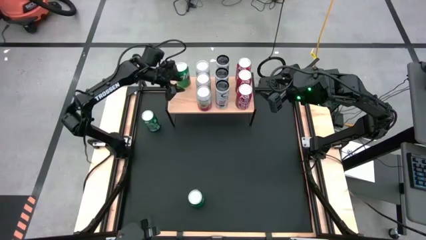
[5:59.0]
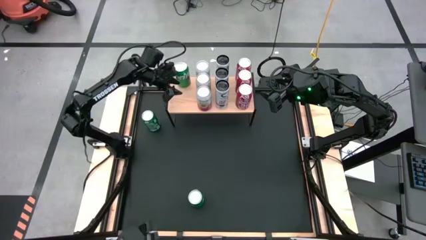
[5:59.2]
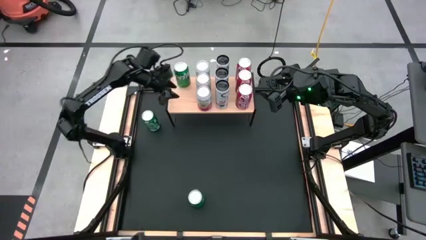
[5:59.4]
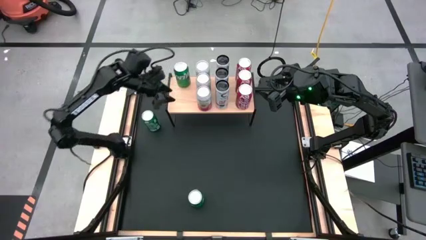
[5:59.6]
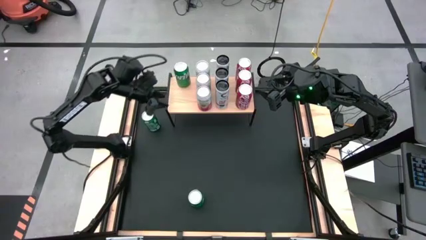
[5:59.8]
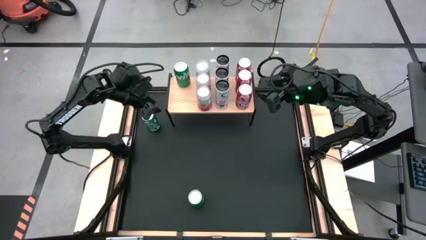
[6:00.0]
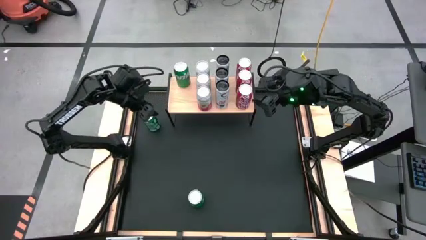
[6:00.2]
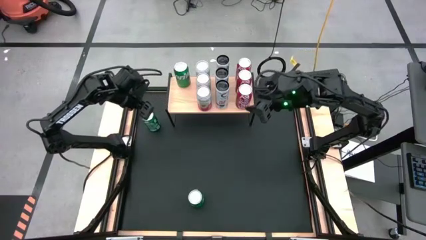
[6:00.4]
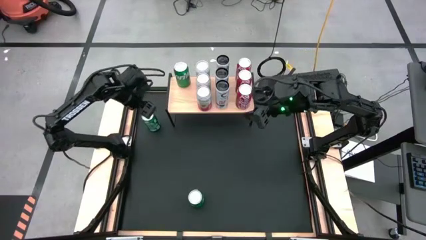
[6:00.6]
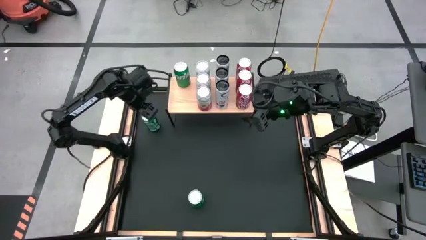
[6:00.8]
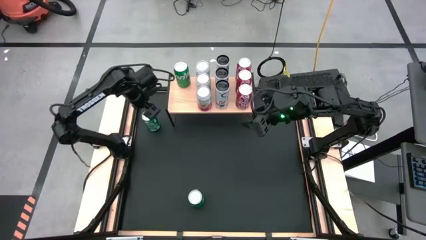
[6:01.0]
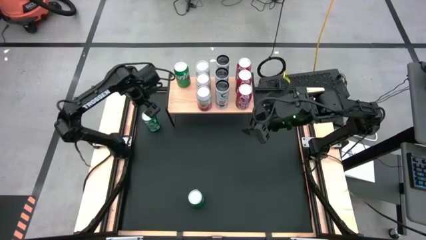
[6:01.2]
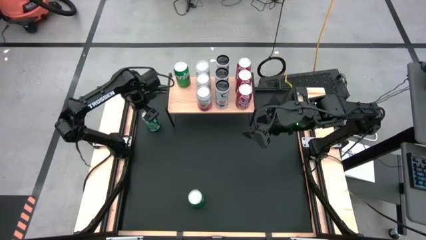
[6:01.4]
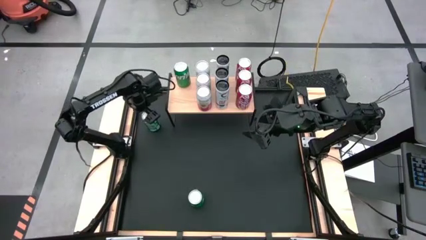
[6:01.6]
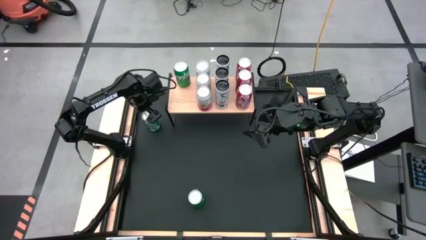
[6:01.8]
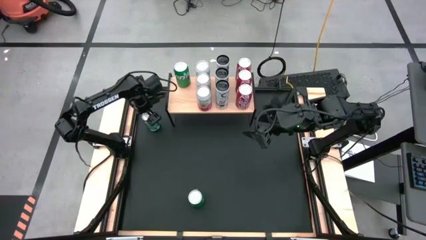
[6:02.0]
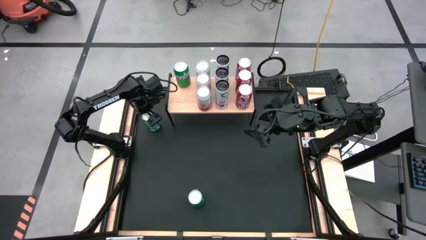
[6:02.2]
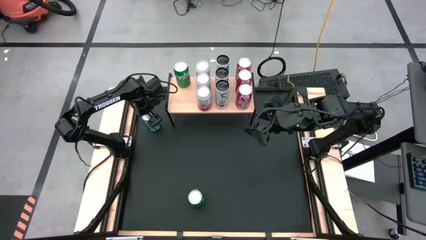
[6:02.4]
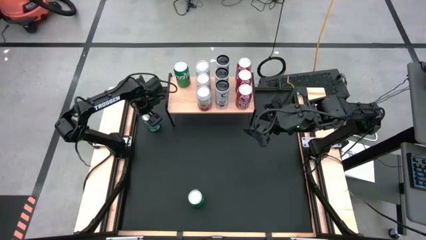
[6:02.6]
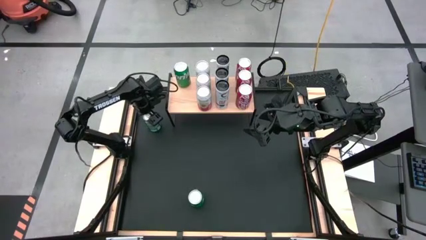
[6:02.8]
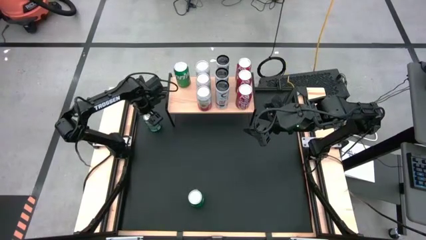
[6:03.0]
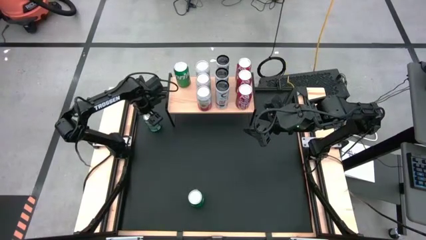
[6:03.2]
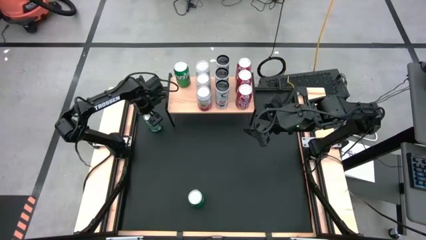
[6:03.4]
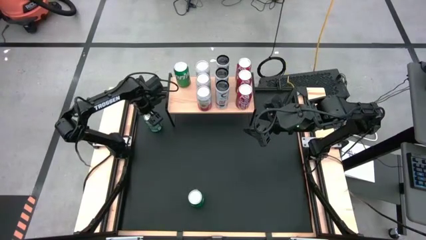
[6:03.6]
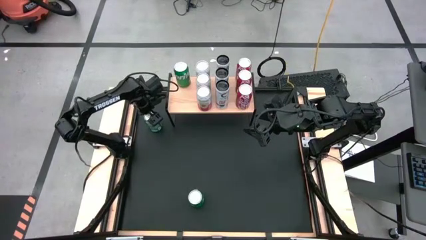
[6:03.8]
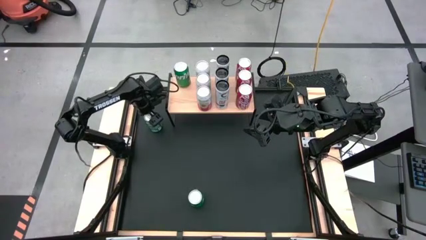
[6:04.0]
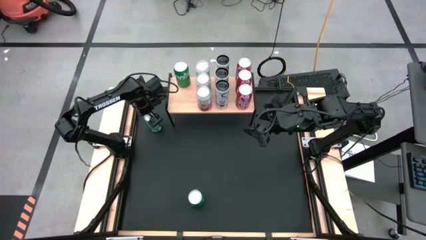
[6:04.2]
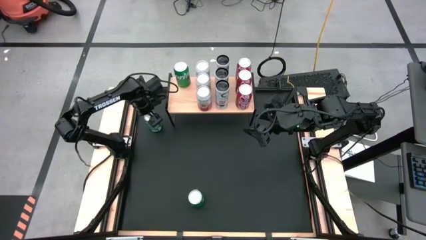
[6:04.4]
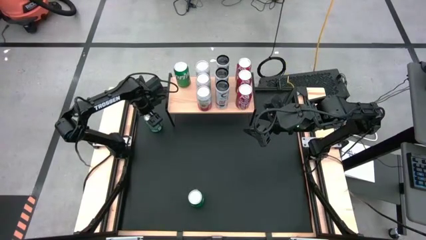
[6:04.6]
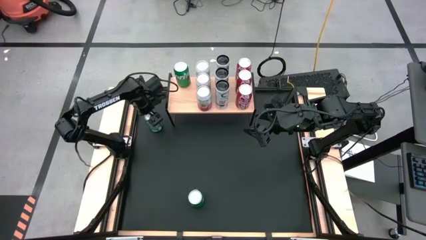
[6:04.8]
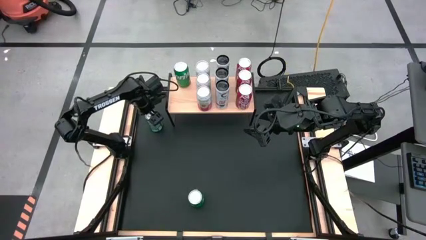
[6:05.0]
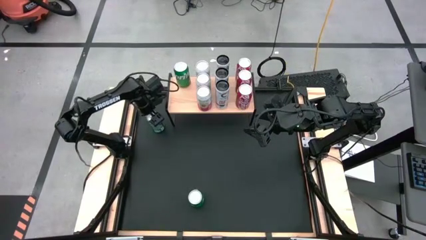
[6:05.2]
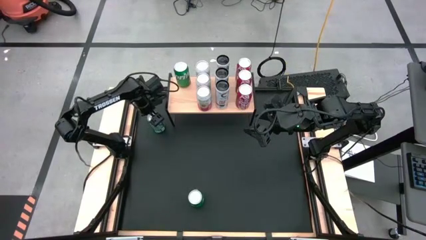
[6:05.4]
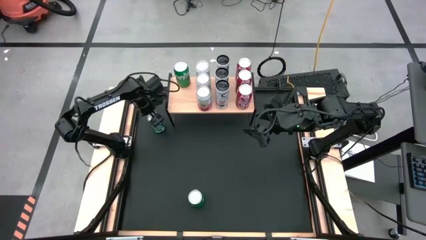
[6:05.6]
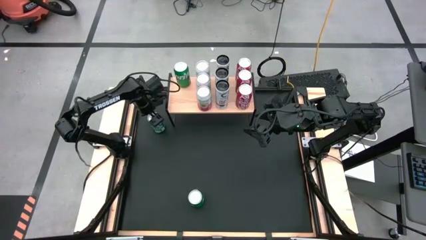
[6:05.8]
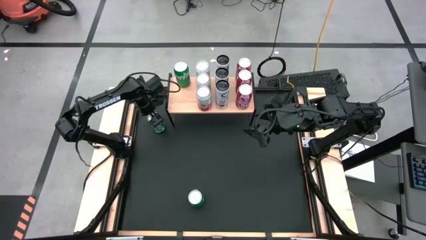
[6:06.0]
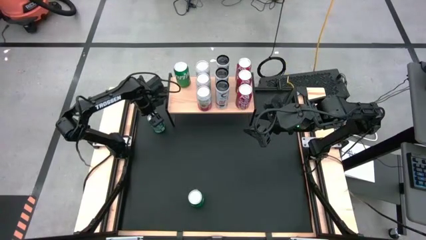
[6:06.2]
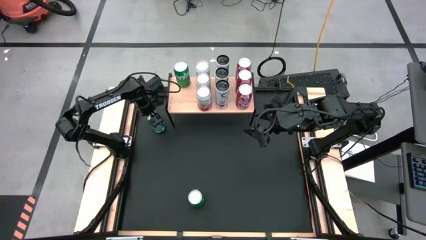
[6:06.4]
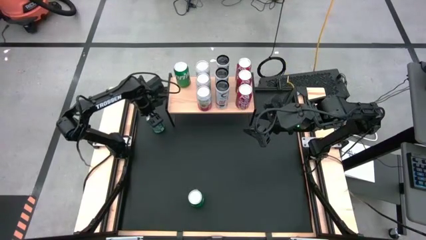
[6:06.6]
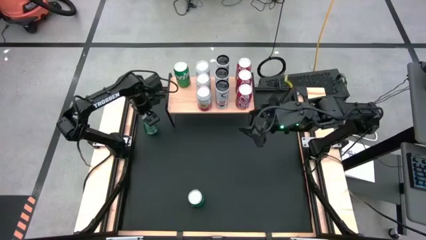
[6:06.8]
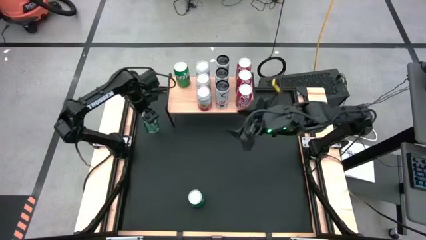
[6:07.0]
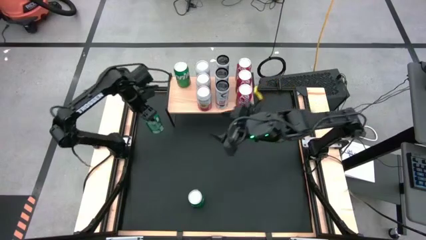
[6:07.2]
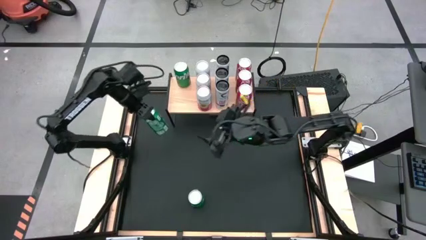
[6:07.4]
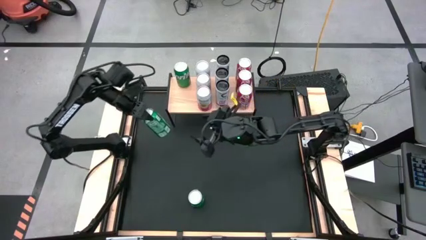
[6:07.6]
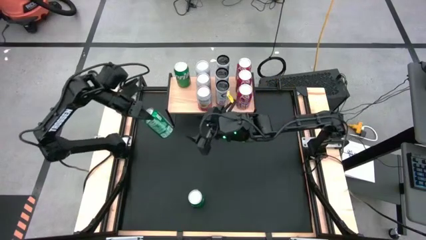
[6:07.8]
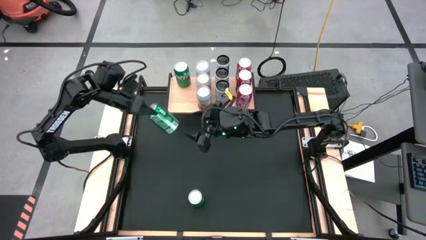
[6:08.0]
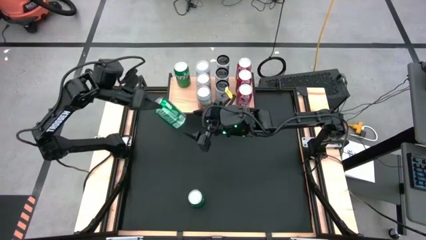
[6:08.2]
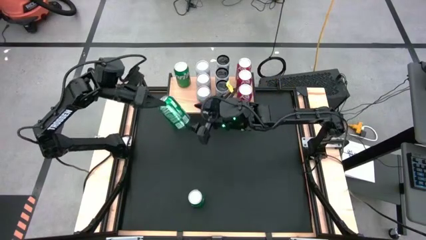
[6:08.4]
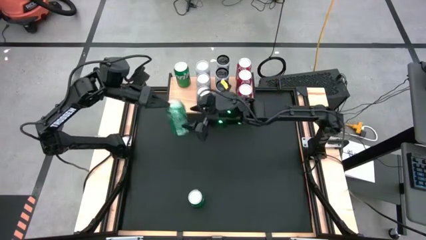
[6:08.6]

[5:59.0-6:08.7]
Task: Place canned beverage on shelf
Put the top green soda can aligned with the other green soda can on the shelf

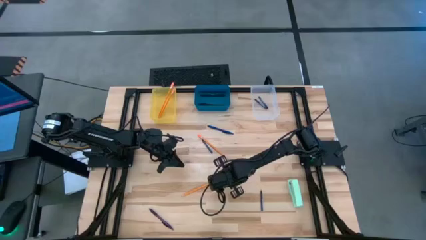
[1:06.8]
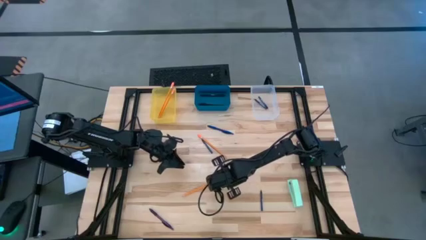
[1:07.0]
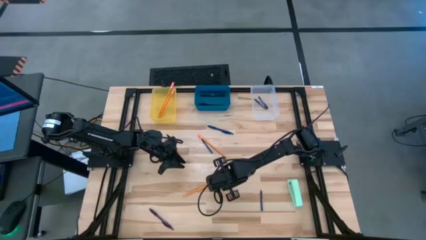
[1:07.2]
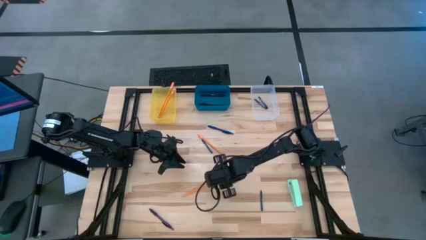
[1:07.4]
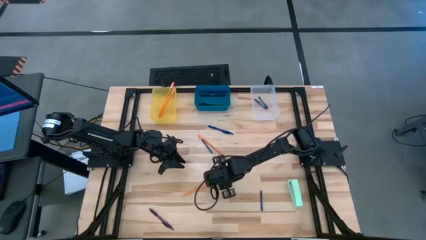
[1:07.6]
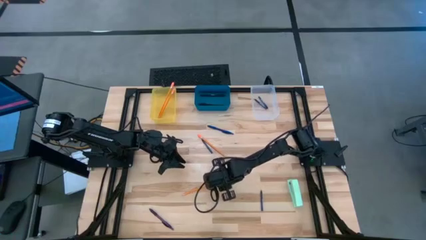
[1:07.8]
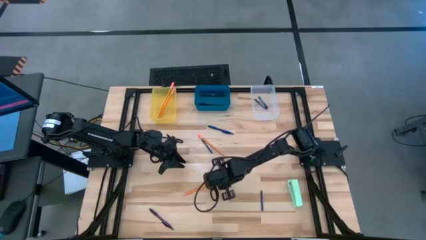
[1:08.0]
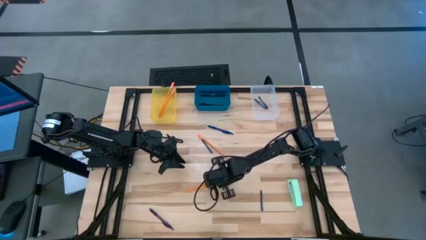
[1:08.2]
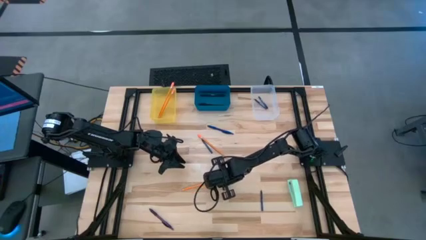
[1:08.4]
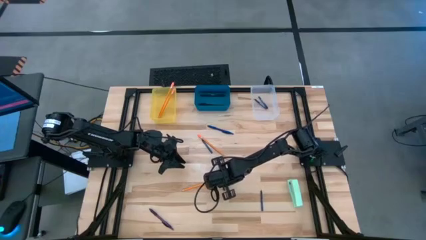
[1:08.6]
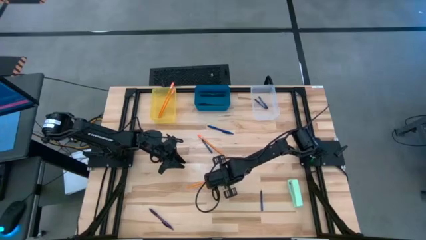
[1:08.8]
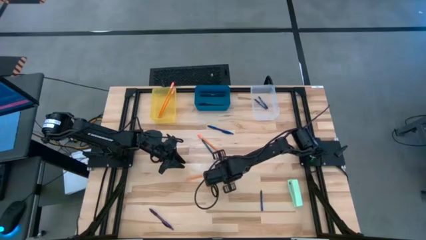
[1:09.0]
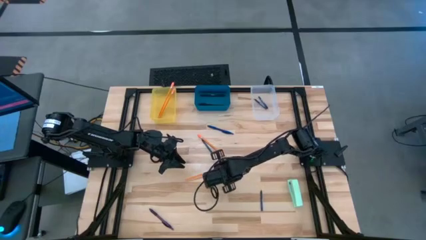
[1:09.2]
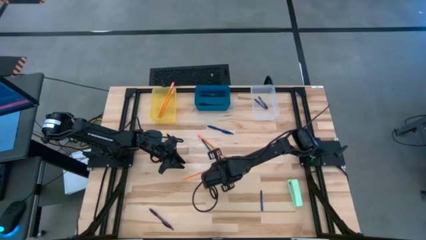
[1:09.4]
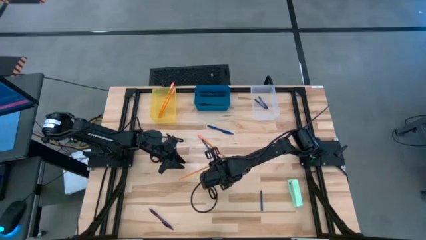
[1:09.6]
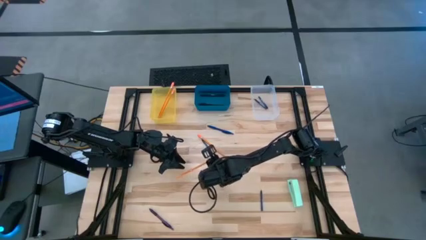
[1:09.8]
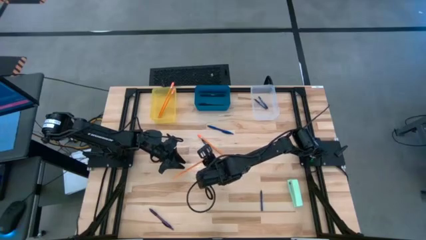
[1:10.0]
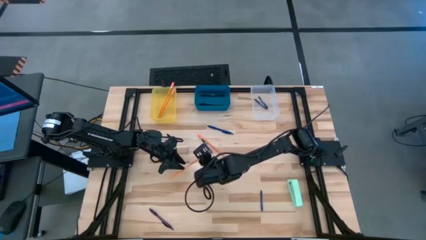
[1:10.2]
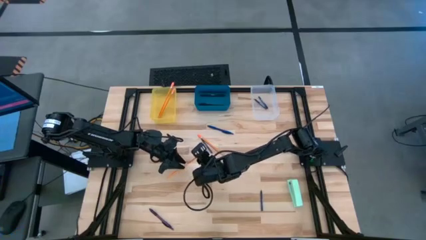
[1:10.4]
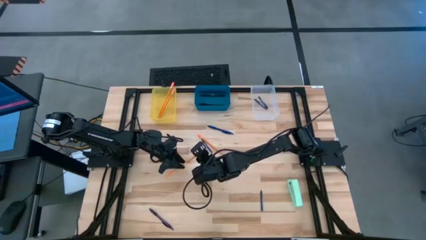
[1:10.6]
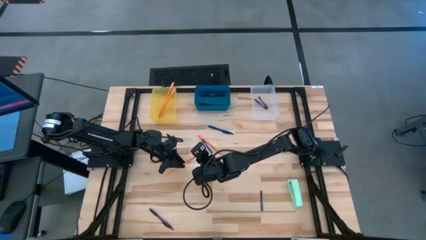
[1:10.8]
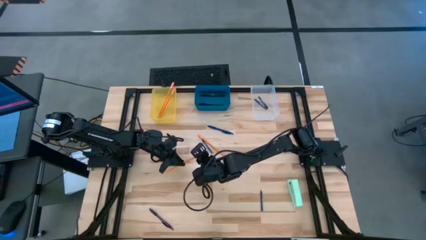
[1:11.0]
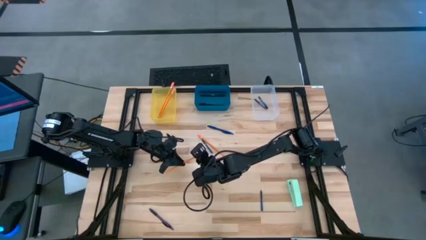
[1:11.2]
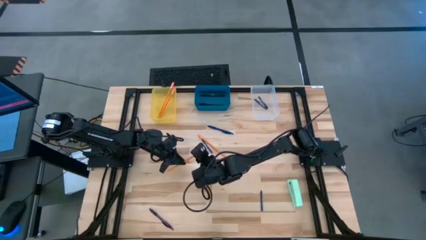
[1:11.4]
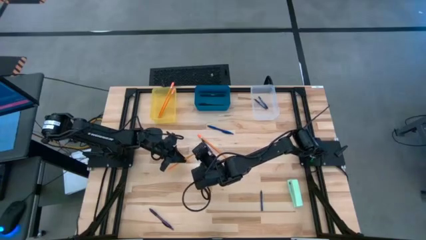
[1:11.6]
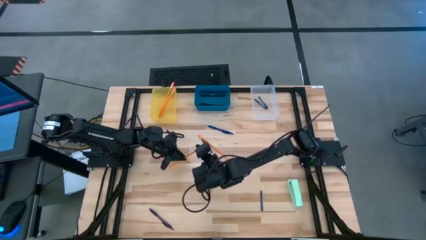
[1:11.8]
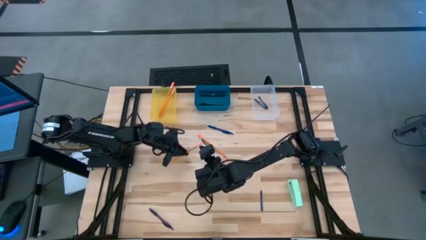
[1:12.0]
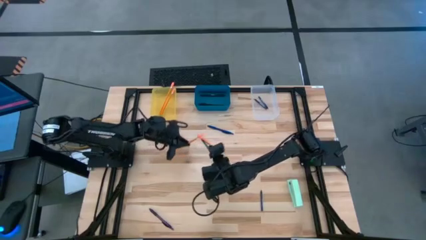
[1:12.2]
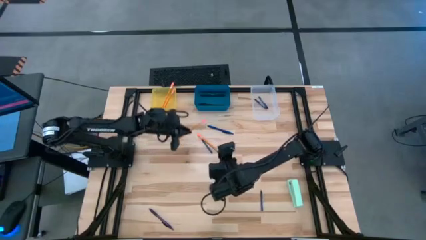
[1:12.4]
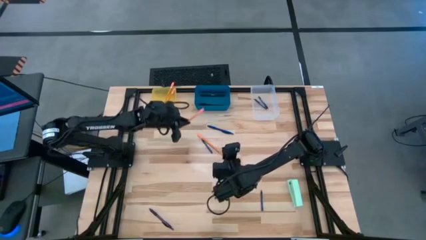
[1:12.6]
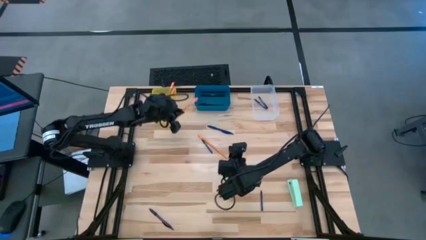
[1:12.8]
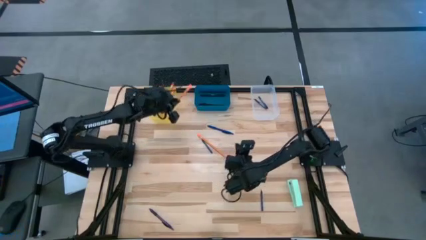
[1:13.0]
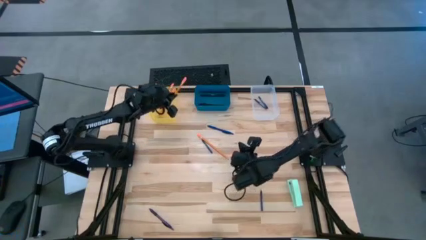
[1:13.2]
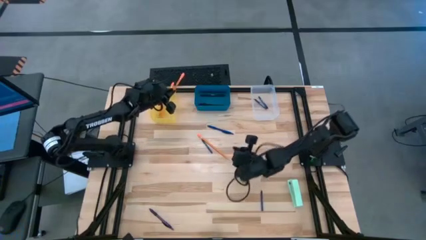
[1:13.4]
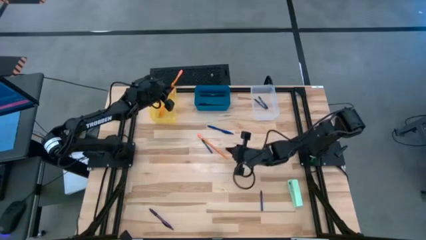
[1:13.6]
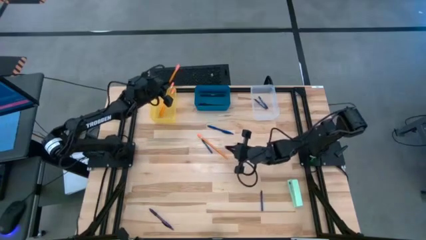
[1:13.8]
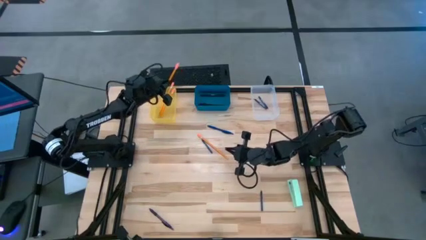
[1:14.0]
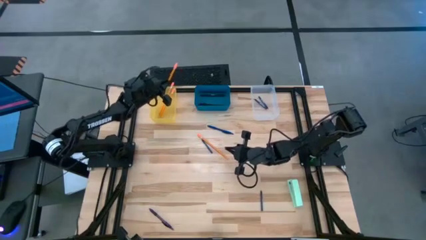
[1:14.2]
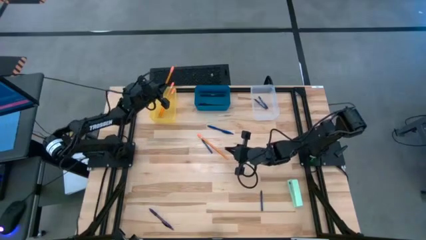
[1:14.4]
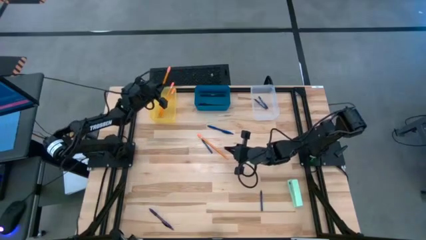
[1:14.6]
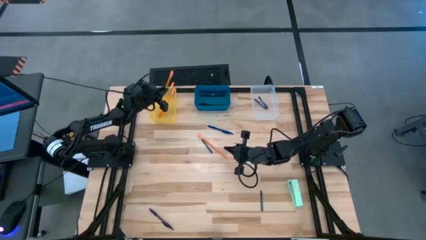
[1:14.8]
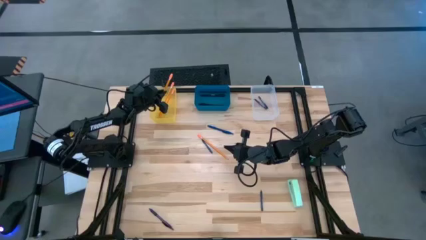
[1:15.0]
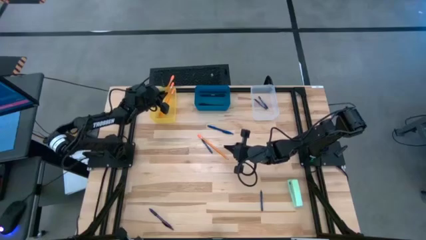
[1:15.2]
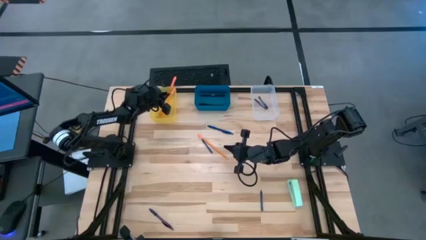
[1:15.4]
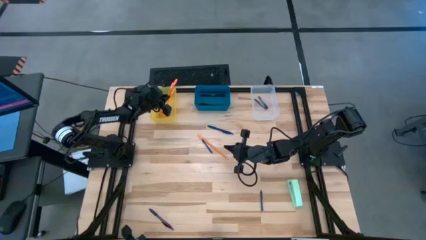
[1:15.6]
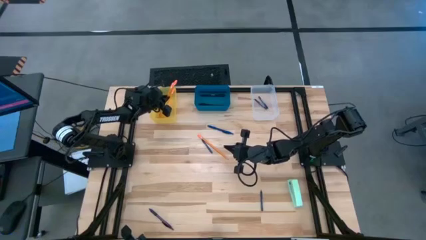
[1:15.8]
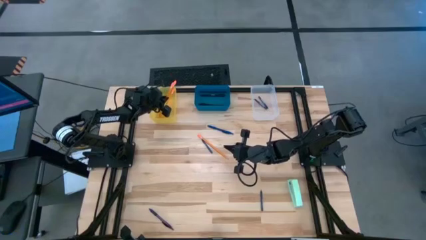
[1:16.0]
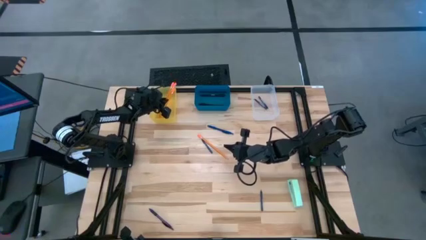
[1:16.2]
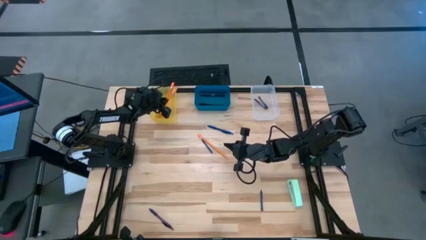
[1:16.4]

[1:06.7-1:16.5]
Task: Sort crayons/erasers/pens/pencils in bins
Put the orange pencil into the transparent yellow bin
